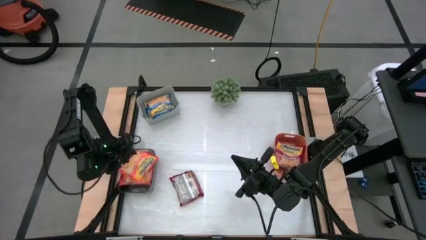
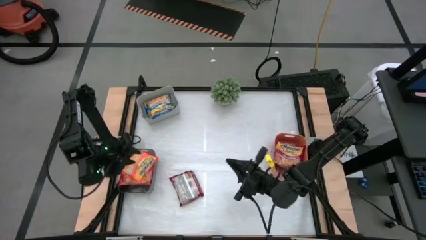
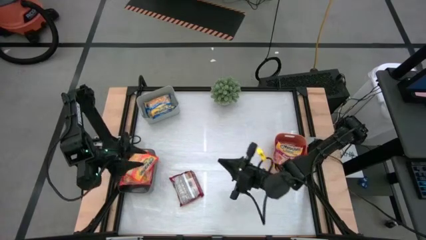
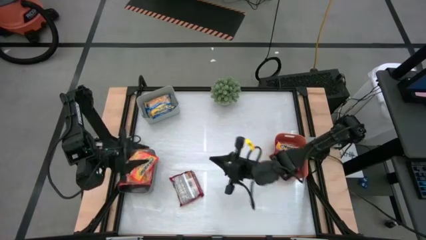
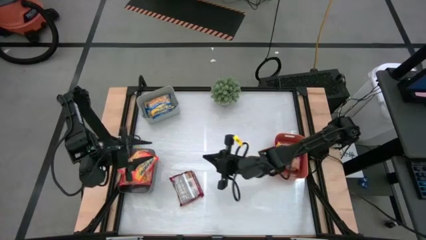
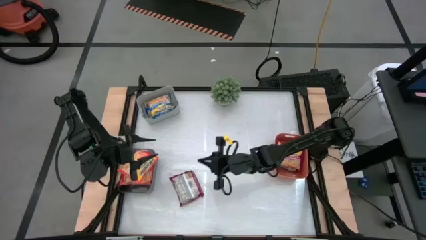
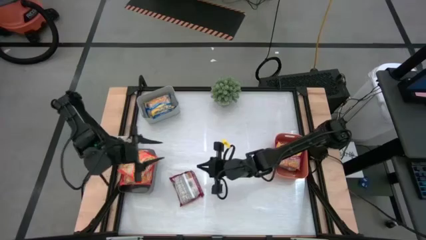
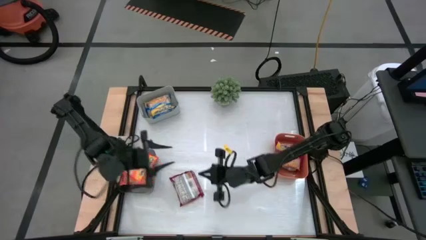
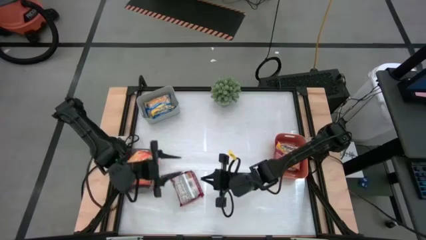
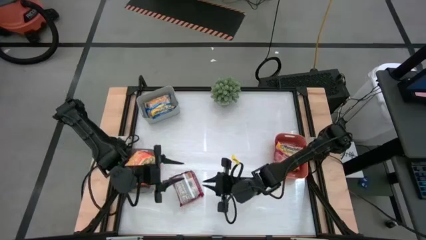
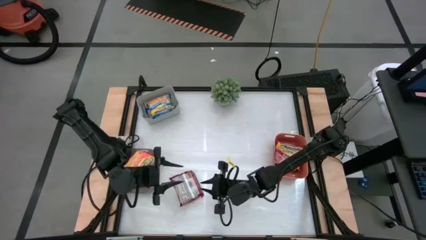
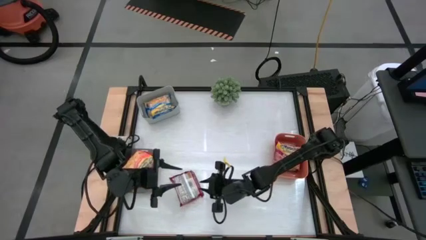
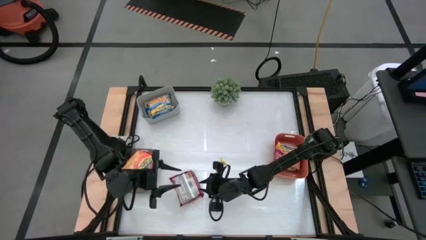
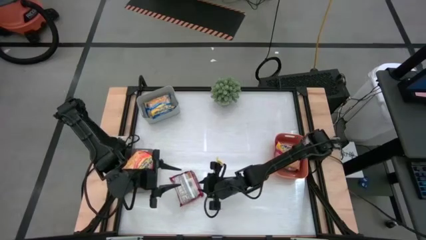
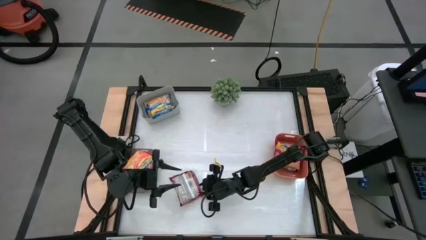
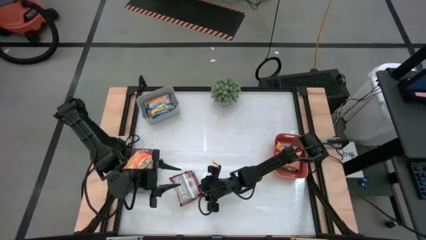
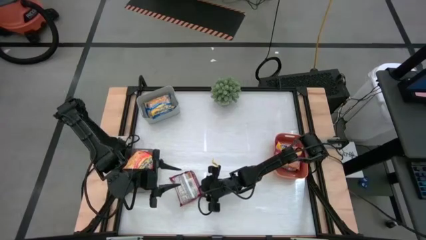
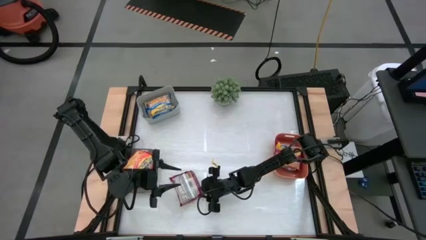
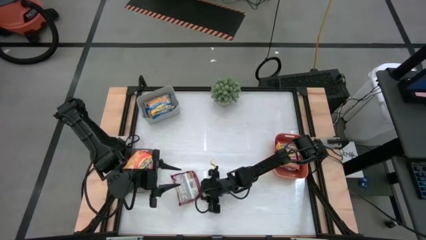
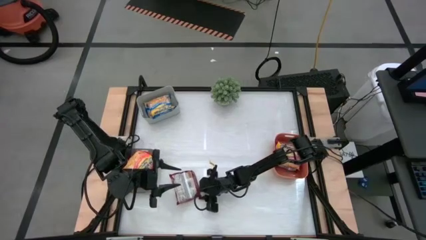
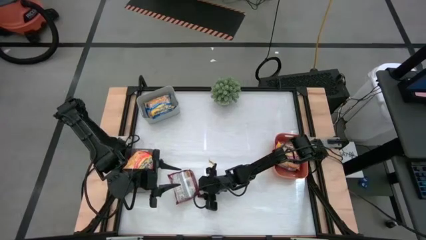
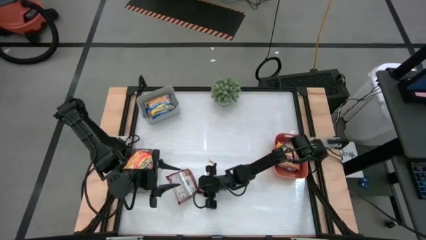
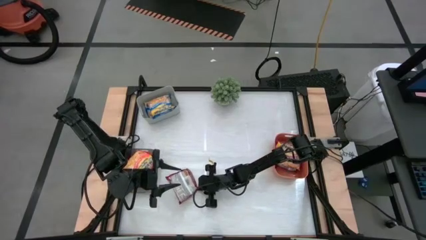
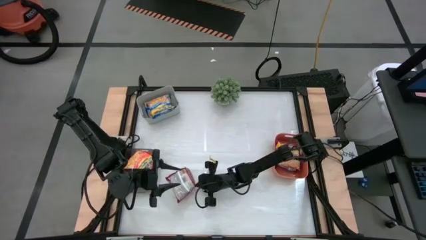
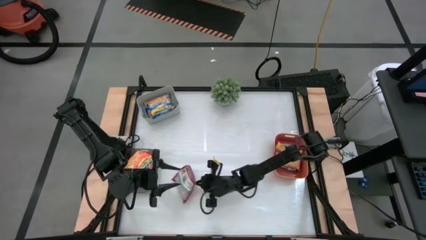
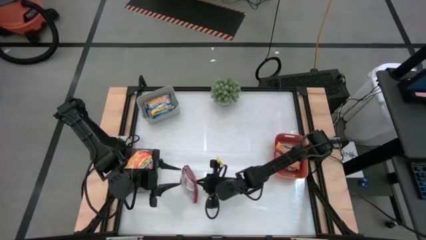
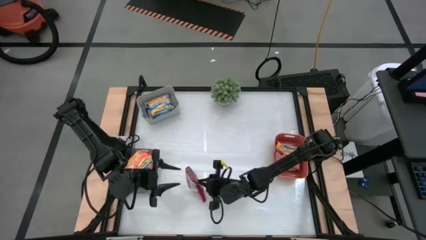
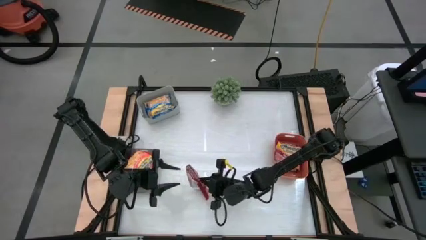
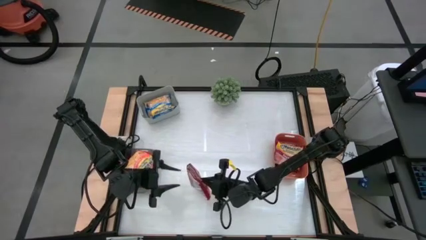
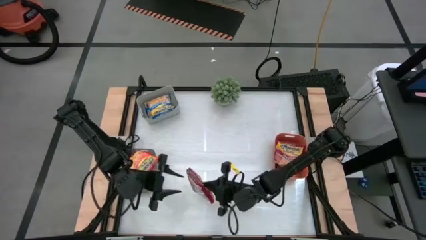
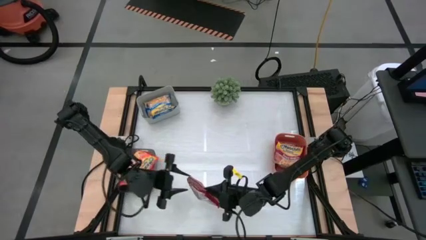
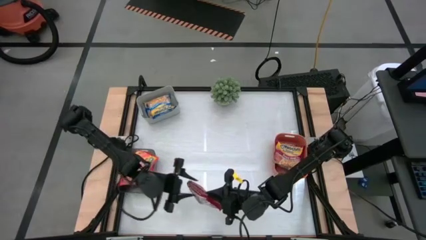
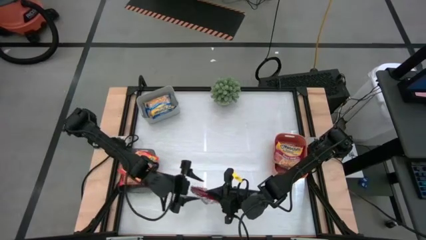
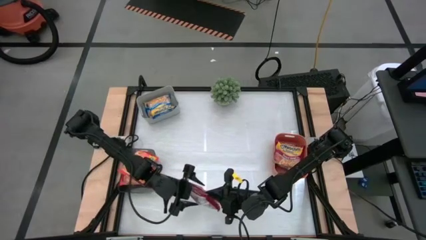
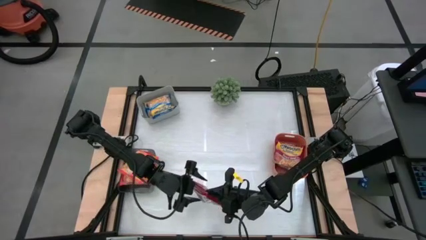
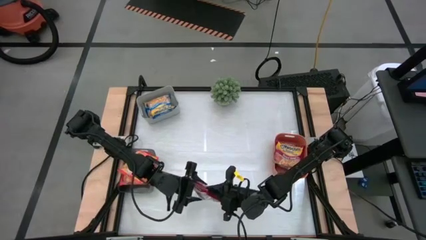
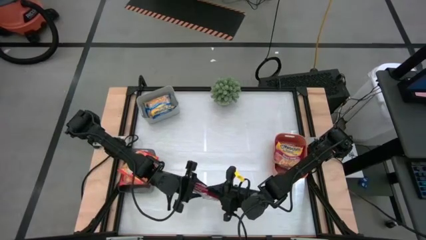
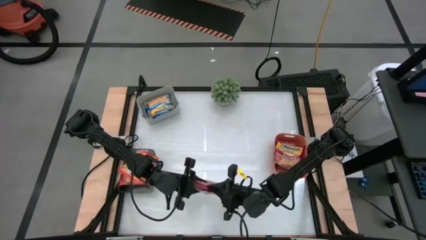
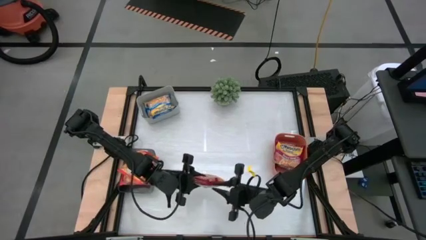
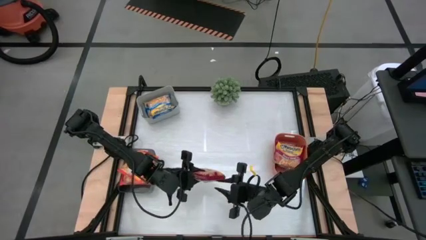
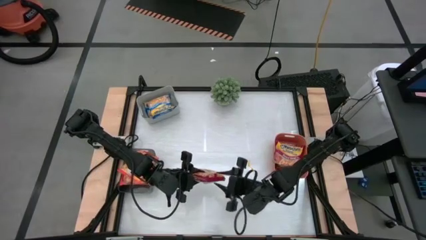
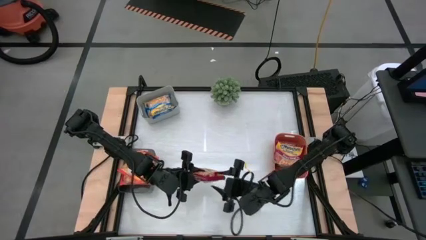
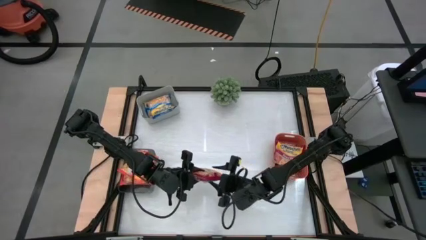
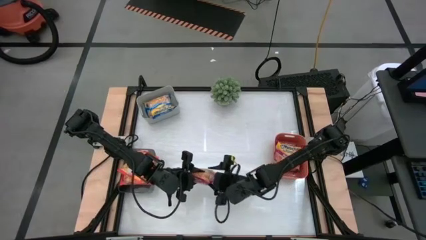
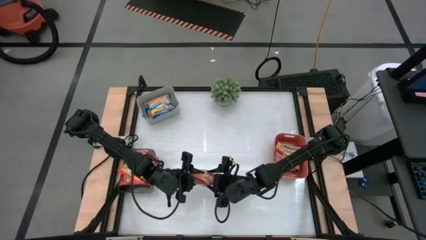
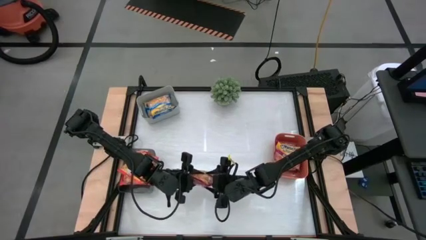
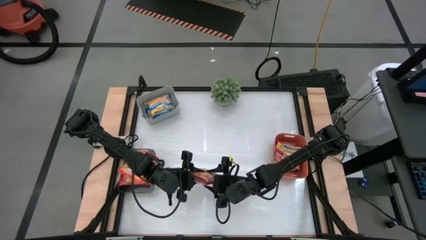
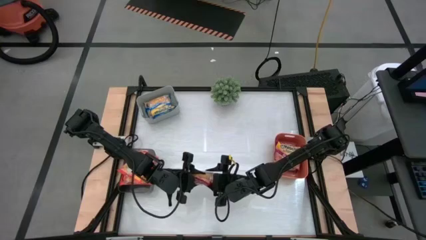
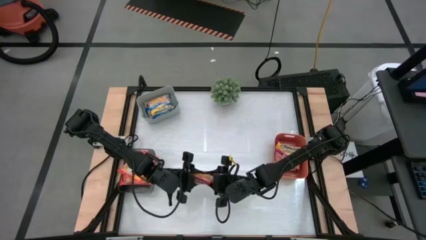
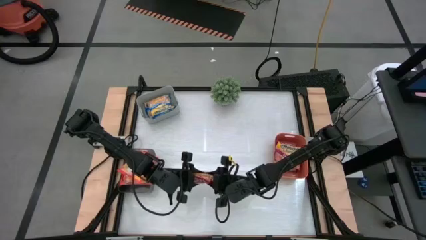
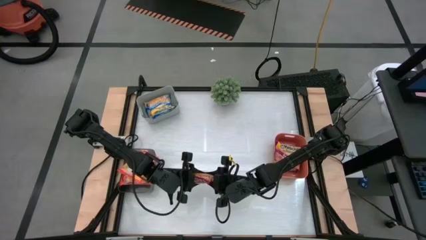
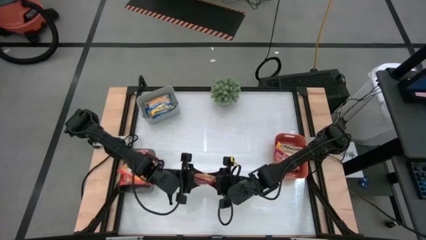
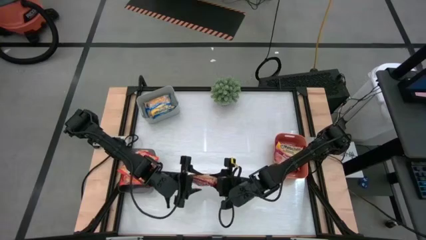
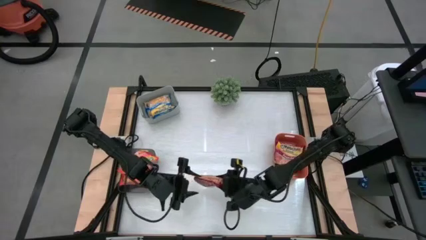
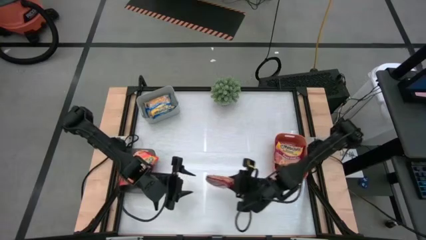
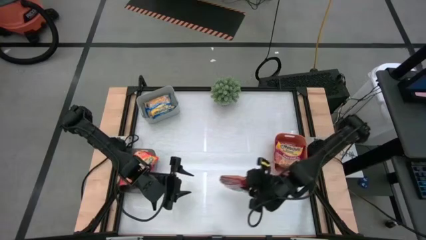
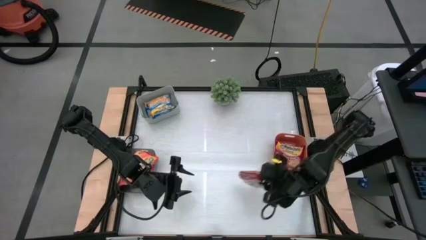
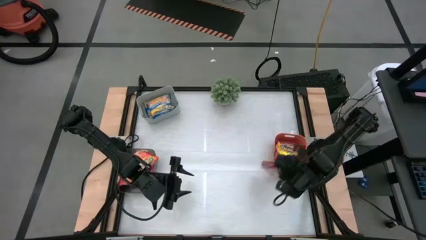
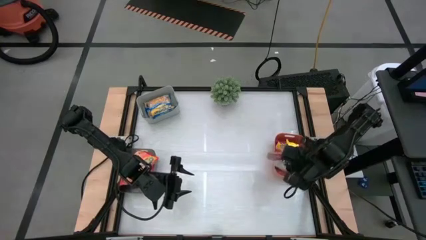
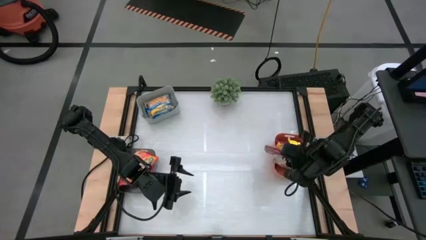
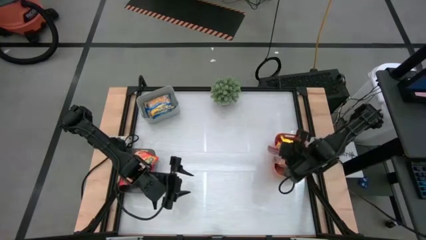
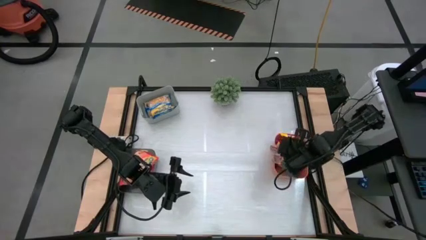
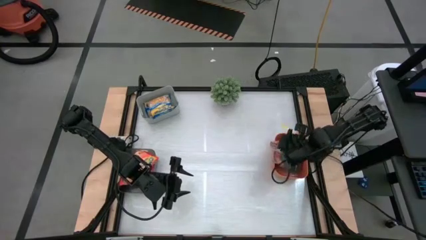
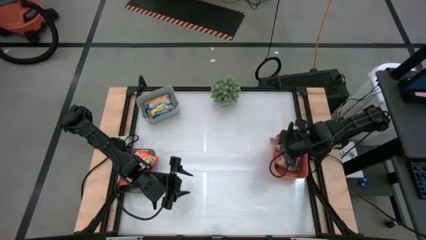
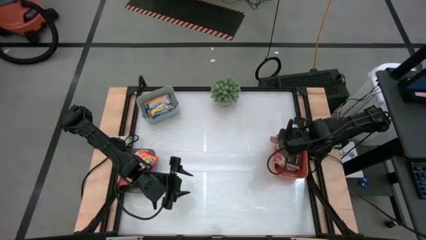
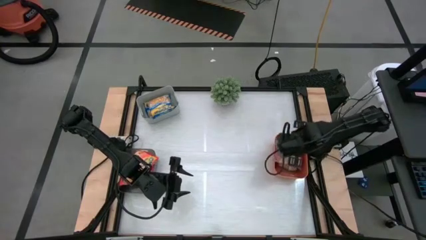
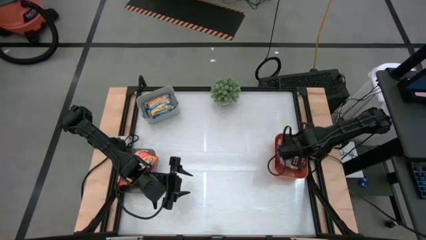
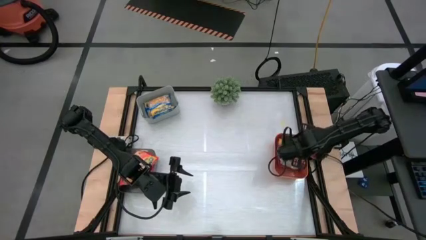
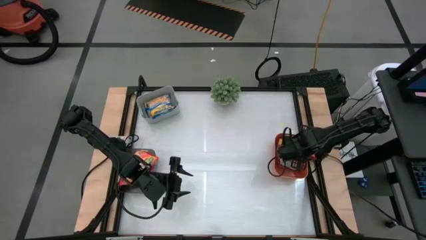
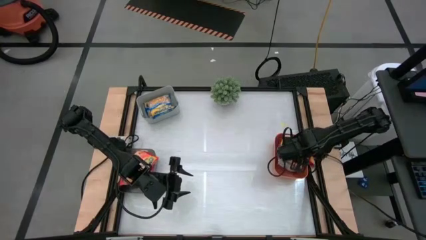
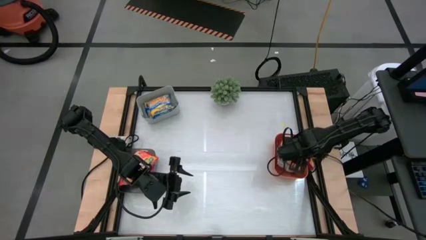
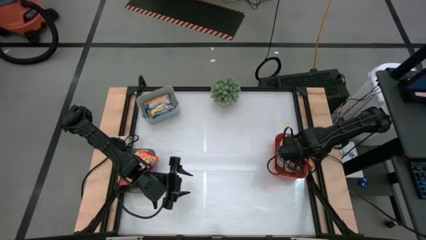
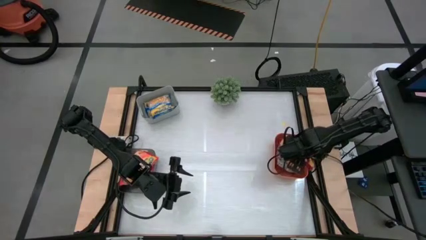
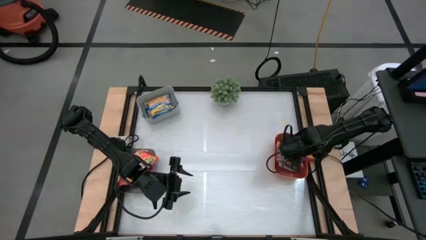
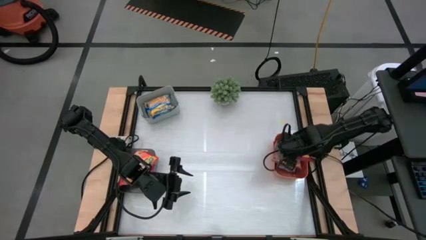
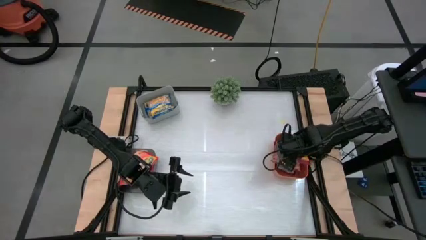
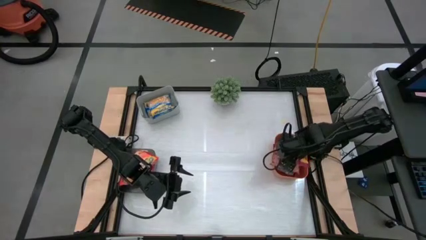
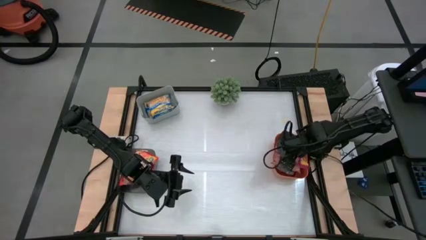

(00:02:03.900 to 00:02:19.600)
Task: Sort Maruchan noodles
Put the red bag into the orange bin
